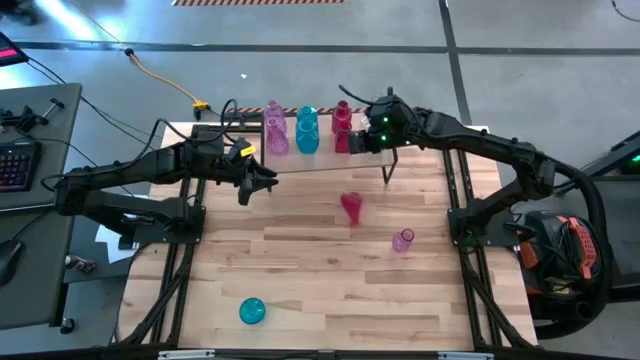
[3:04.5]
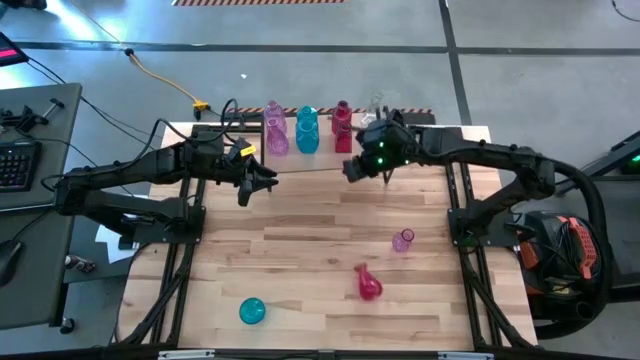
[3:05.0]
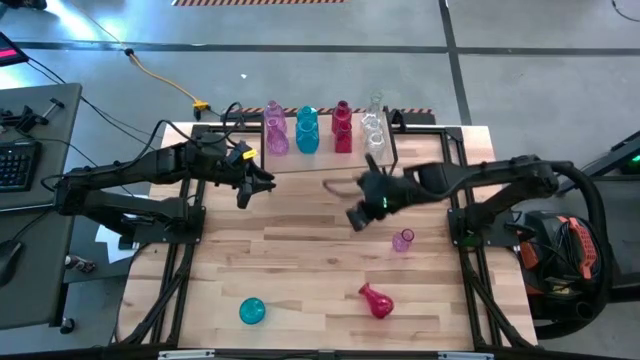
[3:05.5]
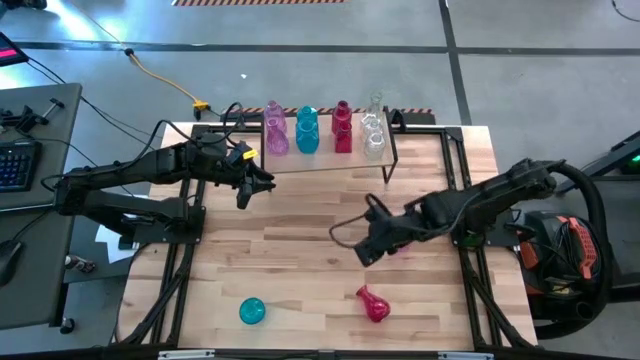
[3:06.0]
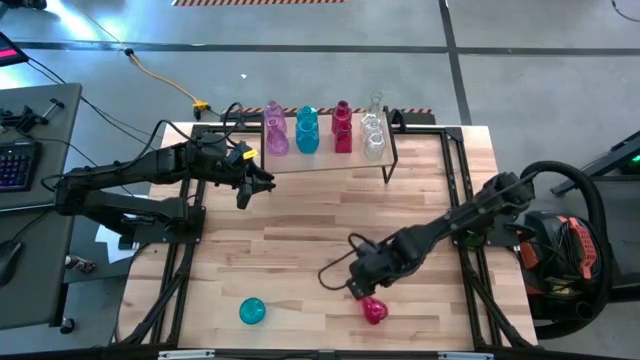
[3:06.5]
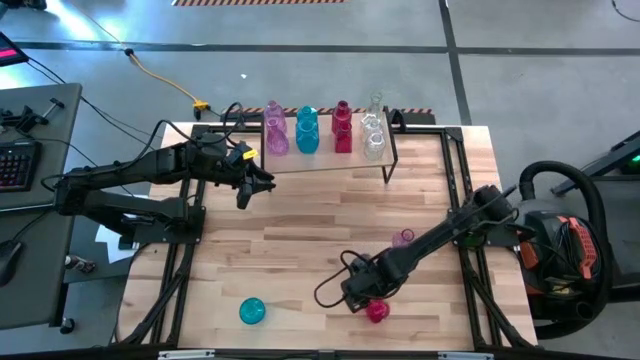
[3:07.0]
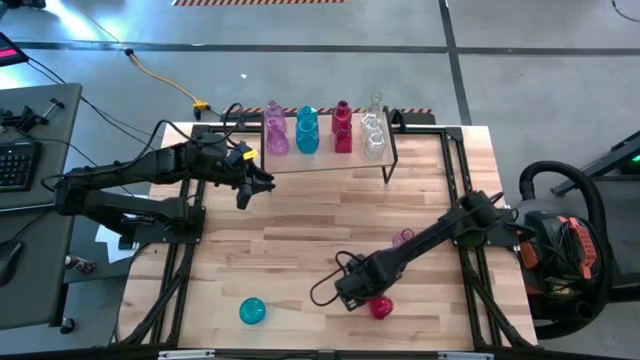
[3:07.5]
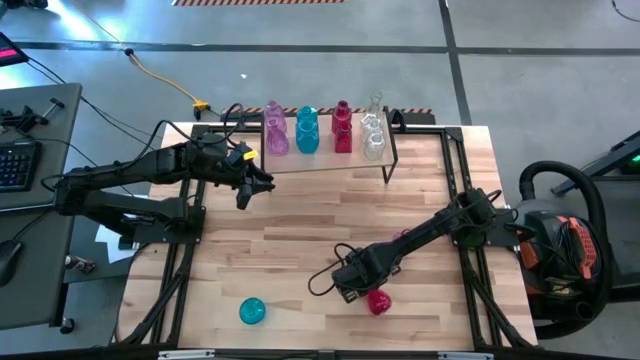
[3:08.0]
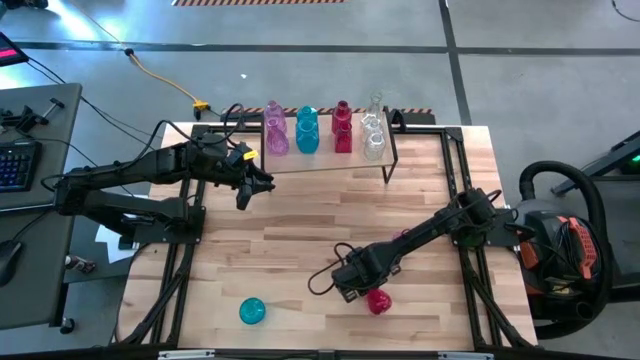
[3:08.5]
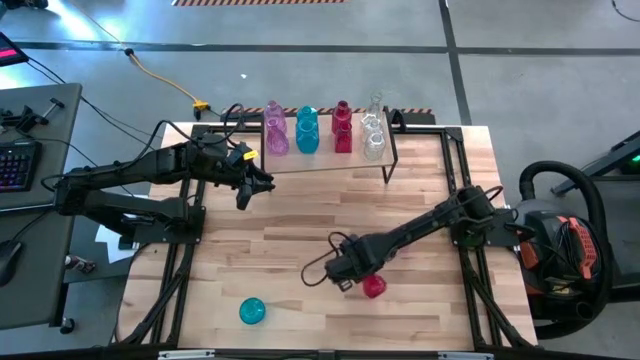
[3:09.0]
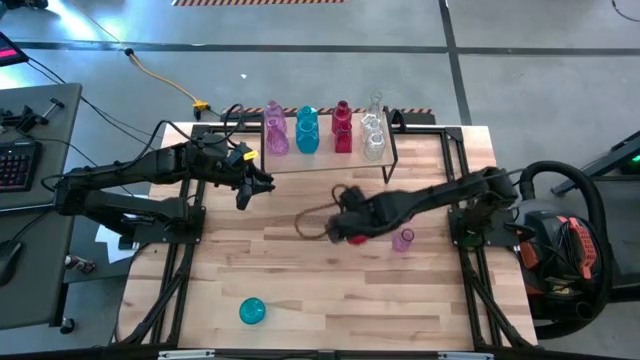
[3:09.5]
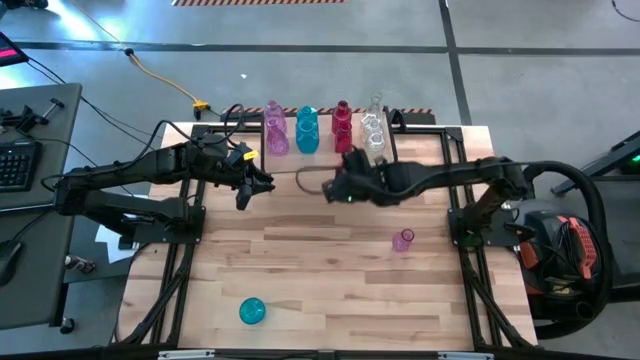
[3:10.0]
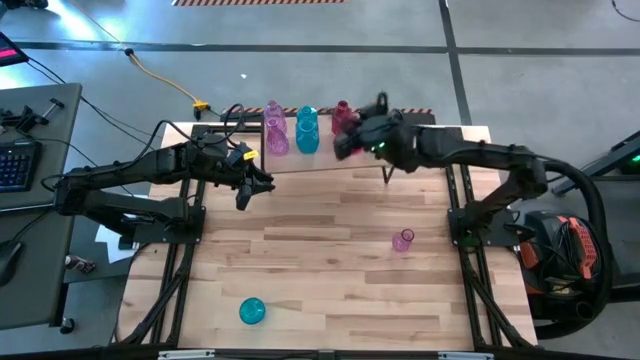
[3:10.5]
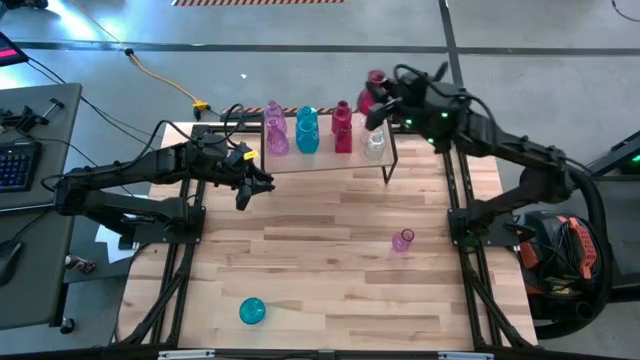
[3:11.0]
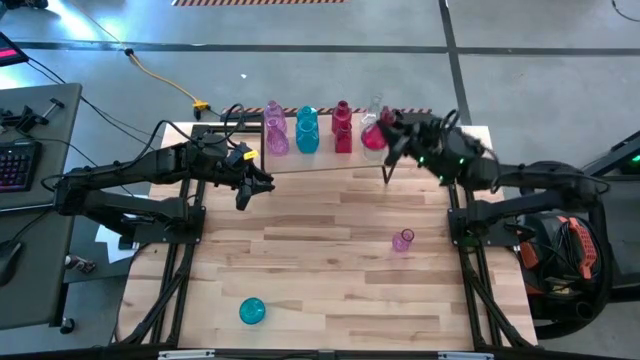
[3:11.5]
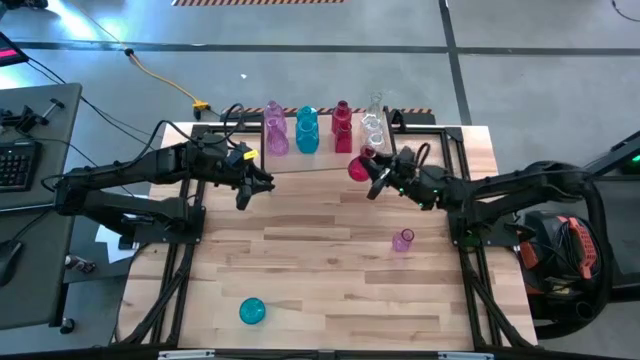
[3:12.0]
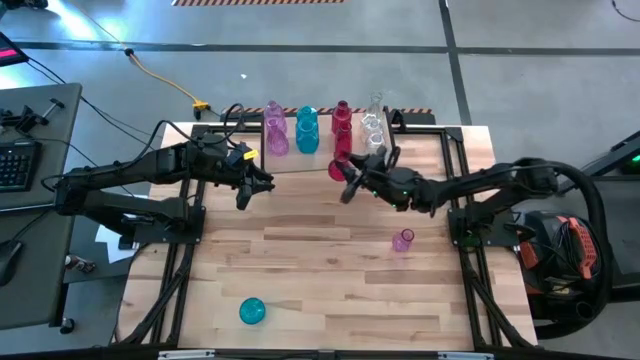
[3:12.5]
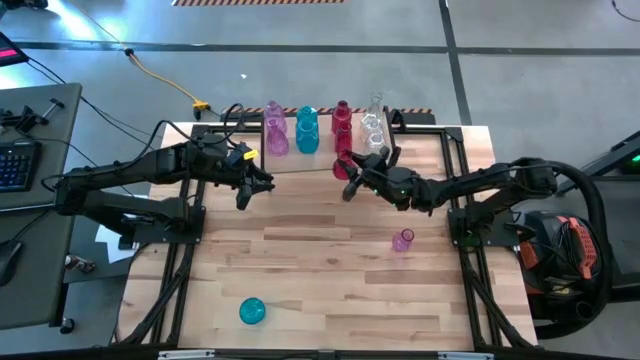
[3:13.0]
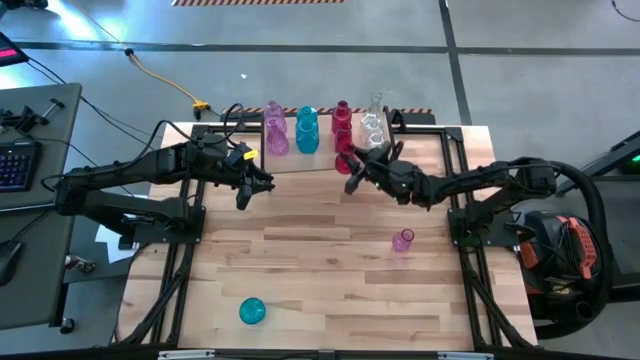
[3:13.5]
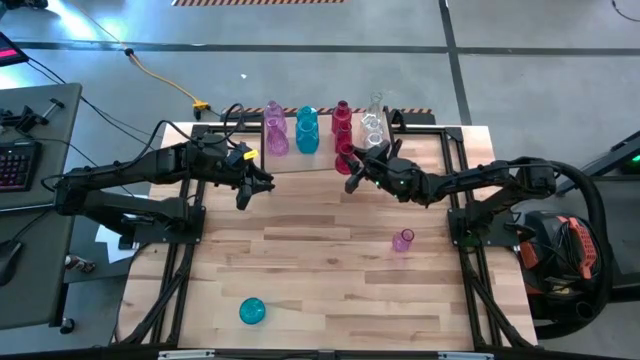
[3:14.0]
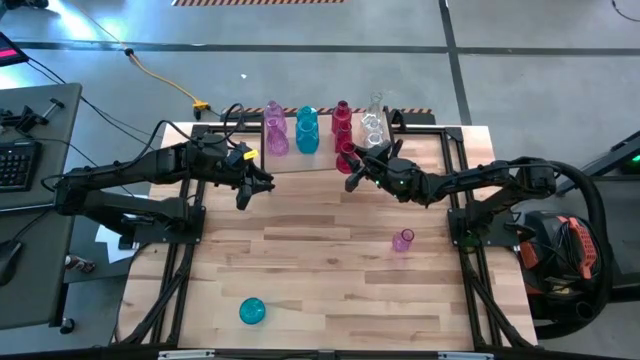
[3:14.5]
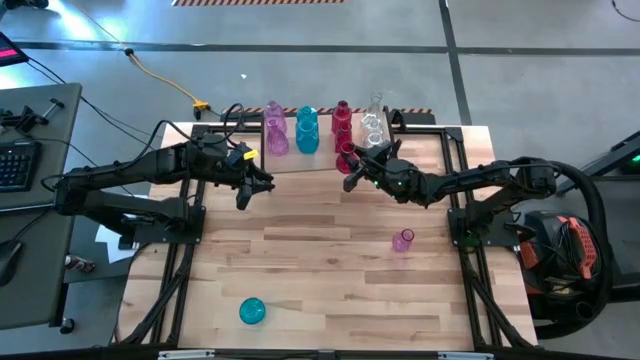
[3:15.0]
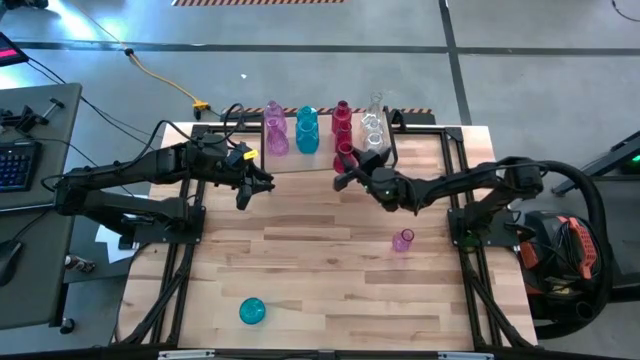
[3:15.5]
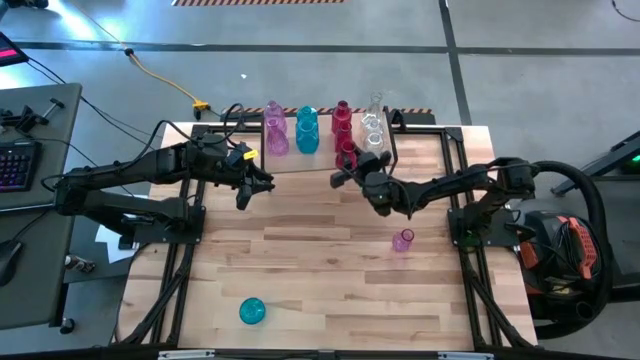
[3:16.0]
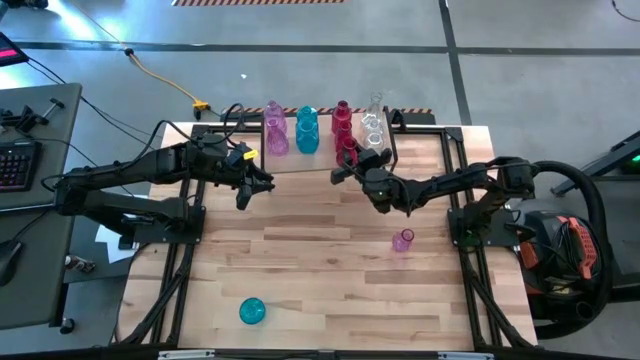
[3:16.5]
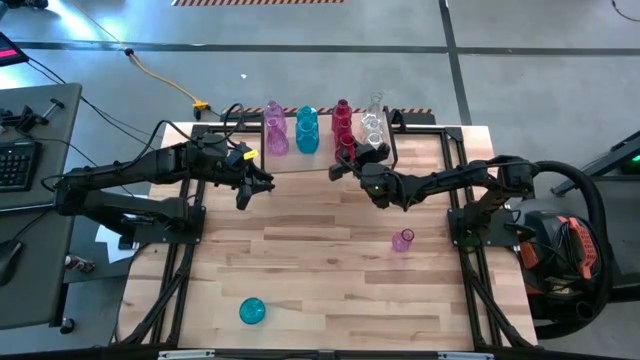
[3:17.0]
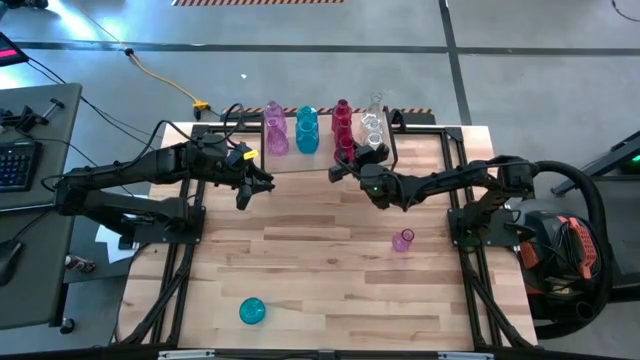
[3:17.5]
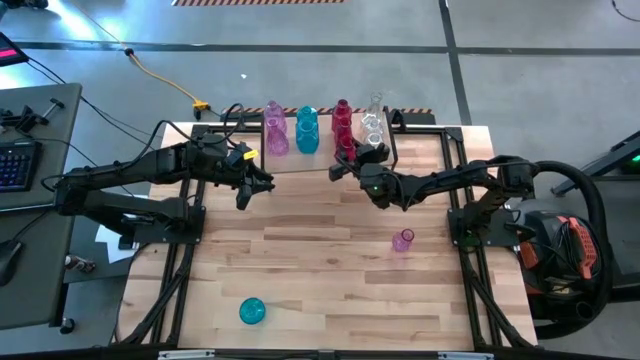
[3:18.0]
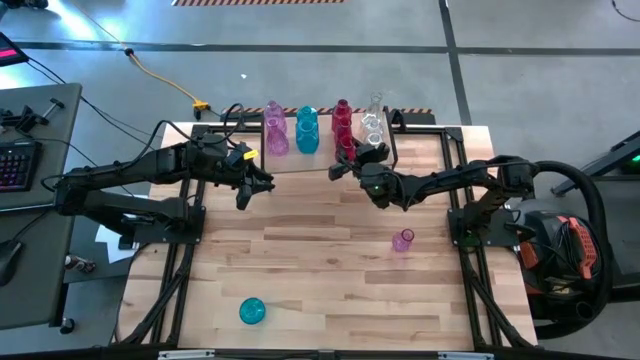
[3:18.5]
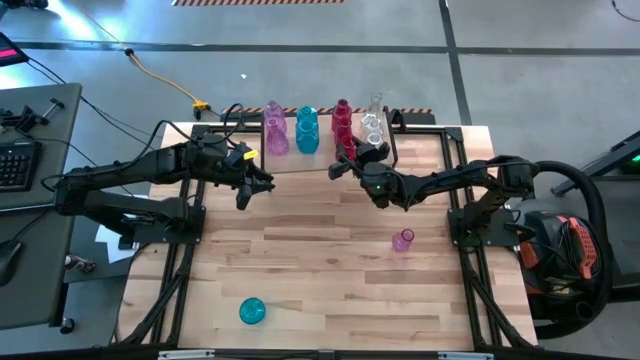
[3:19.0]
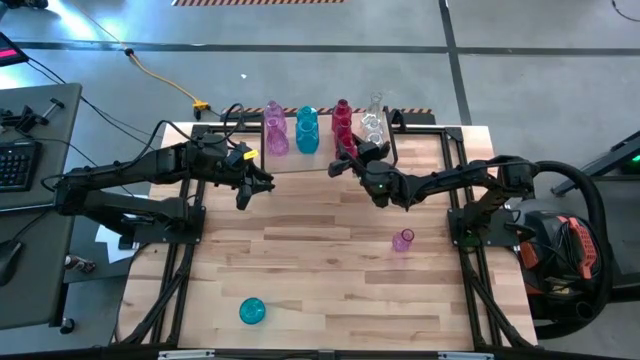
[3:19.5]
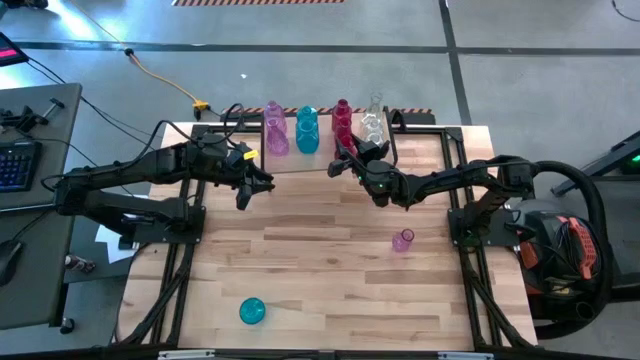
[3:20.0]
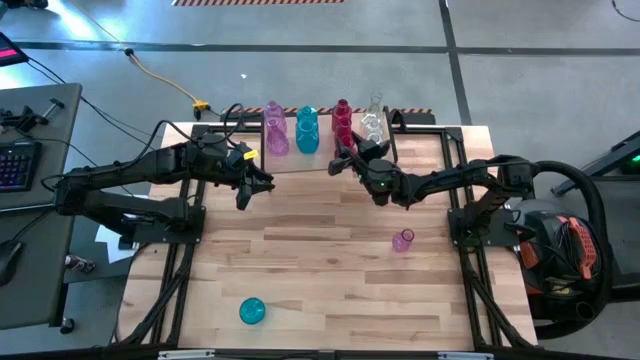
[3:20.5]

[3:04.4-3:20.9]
Task: sort vases onto shelf
Put the red vase on the shelf aligned with the other red vases

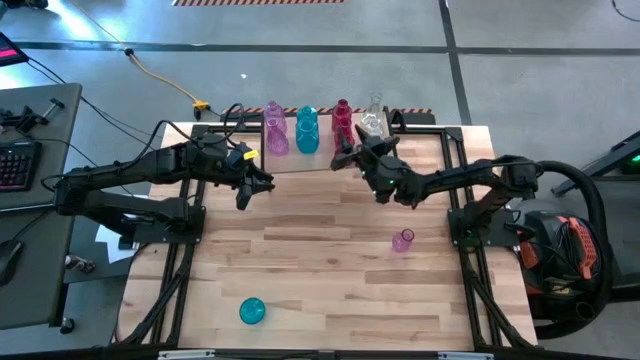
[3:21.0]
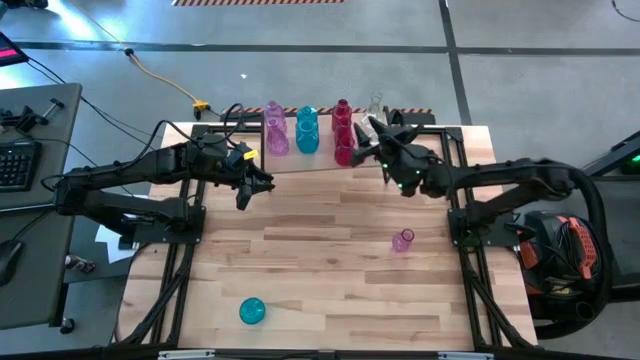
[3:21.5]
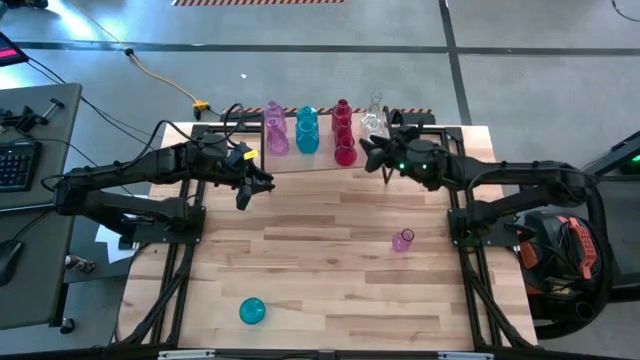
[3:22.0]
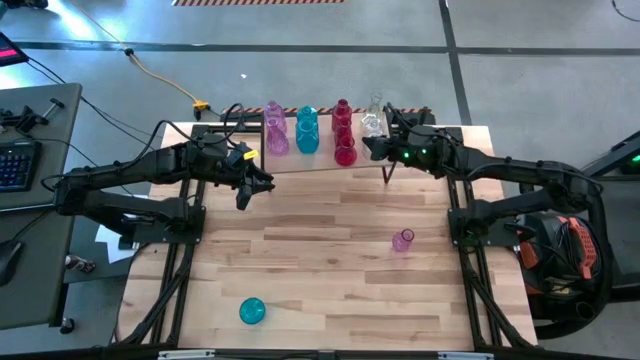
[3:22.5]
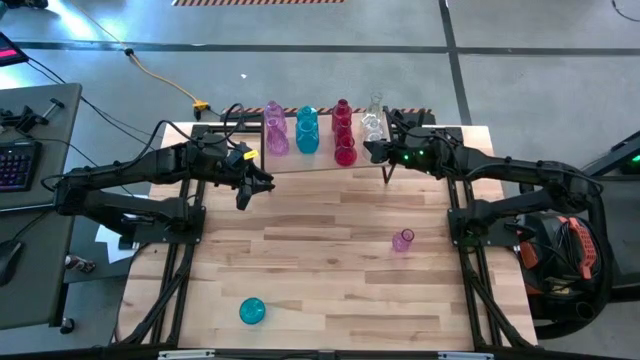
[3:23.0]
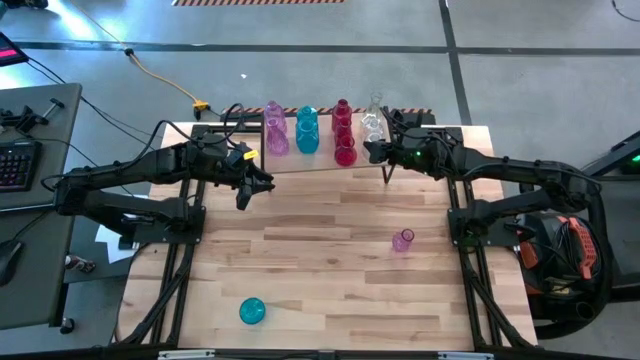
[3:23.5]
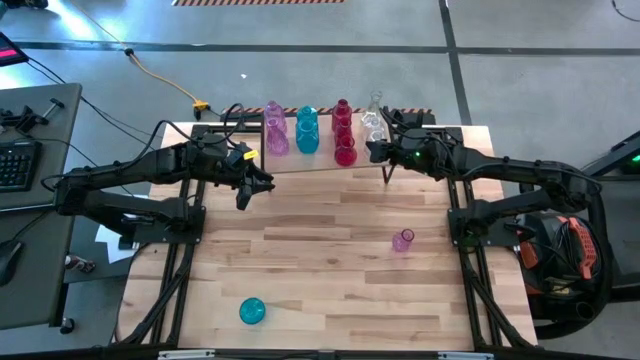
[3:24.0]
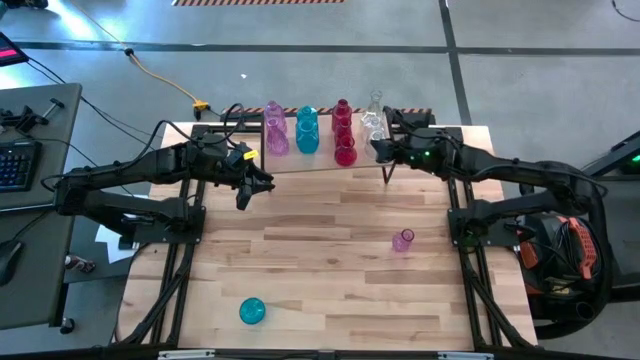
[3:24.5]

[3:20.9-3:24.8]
Adjust the transparent vase
